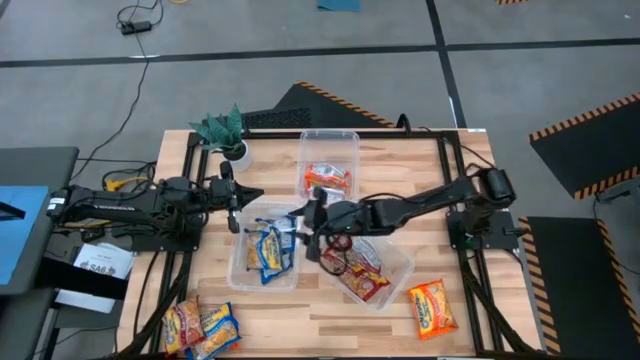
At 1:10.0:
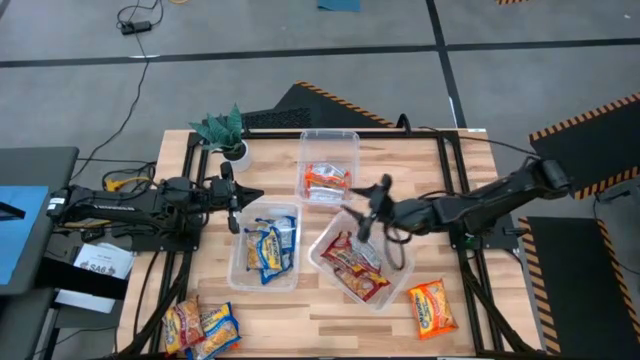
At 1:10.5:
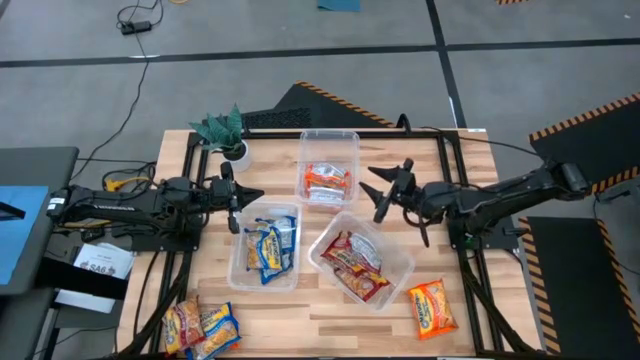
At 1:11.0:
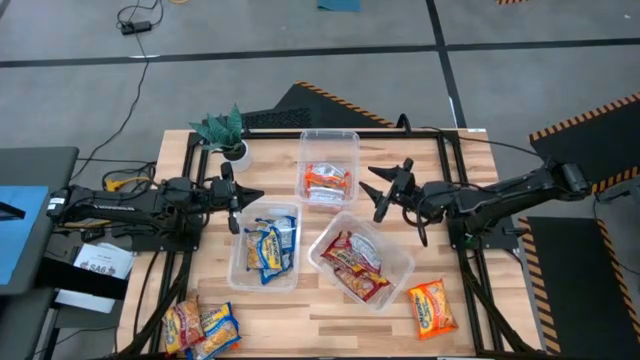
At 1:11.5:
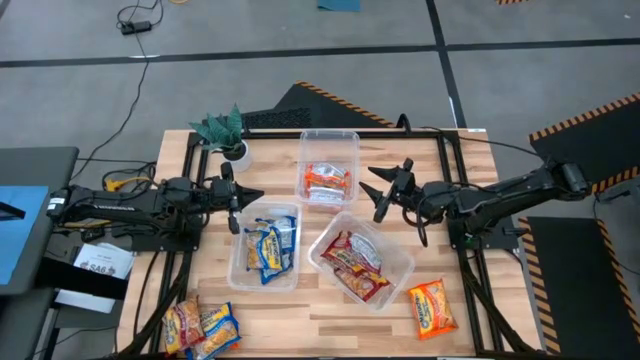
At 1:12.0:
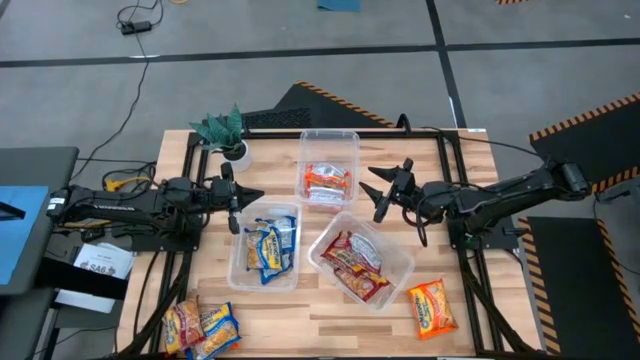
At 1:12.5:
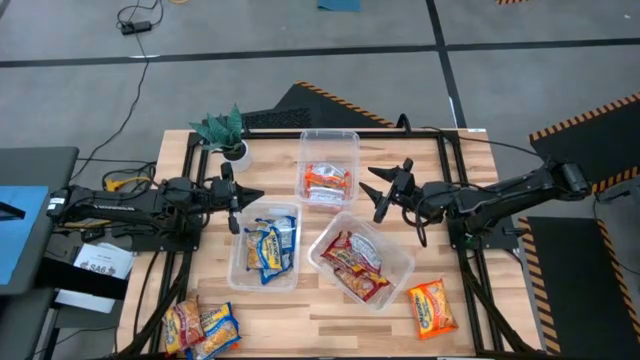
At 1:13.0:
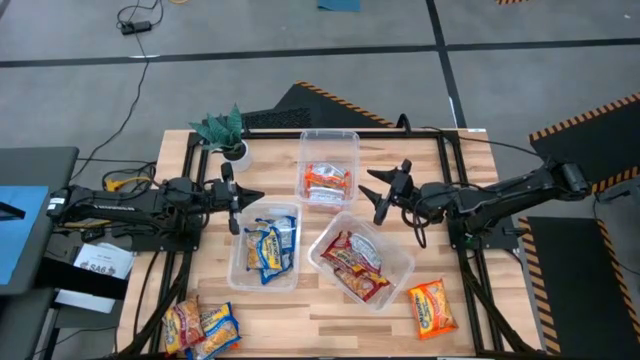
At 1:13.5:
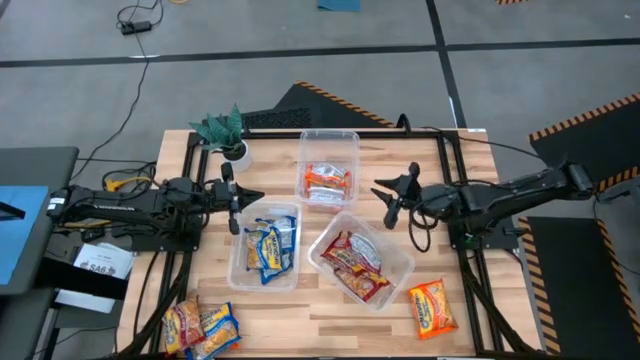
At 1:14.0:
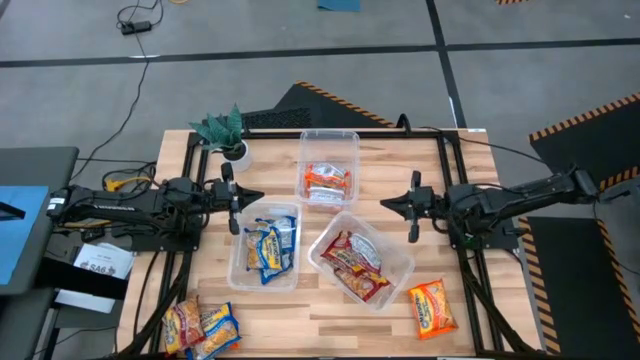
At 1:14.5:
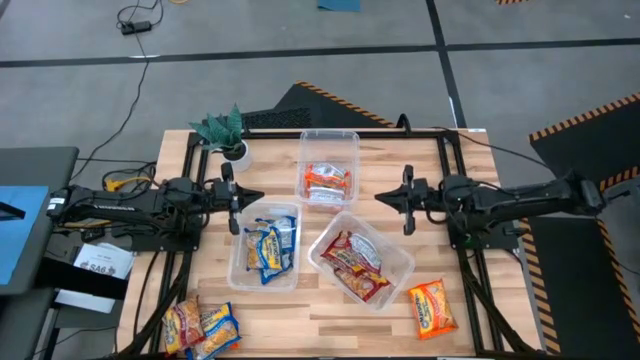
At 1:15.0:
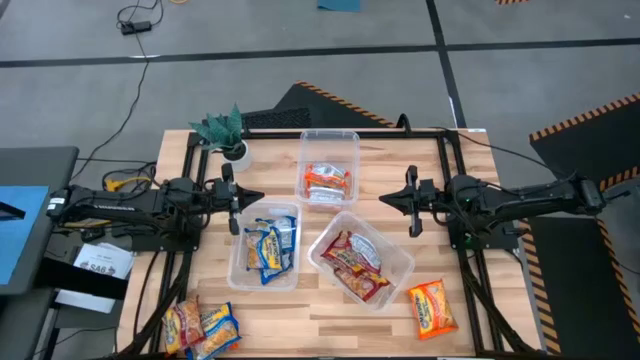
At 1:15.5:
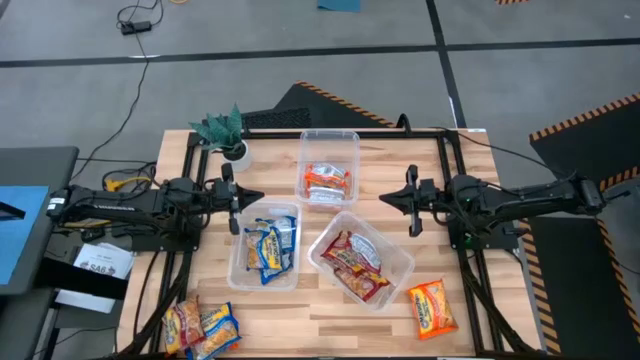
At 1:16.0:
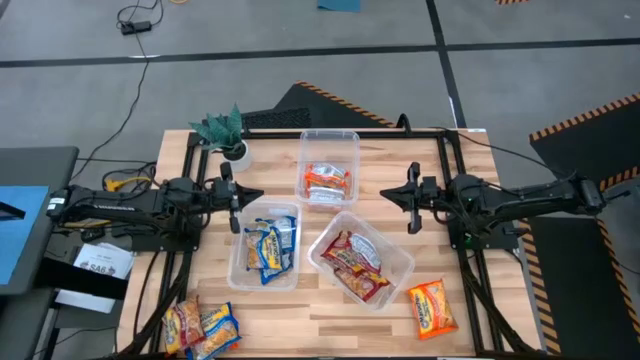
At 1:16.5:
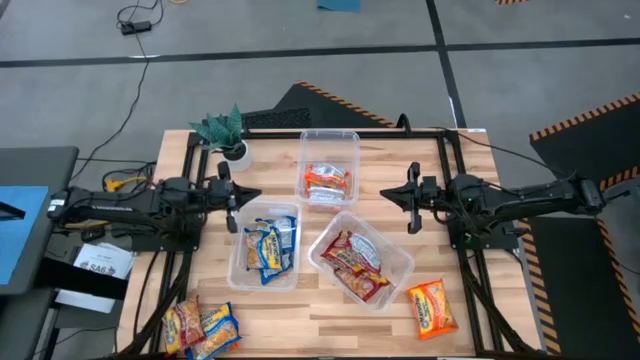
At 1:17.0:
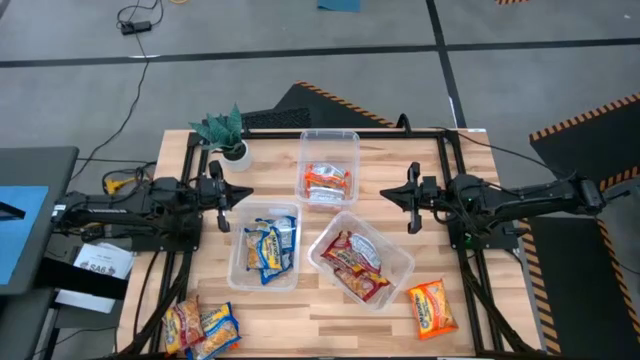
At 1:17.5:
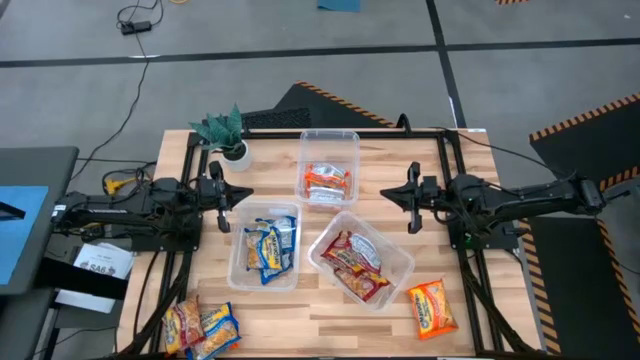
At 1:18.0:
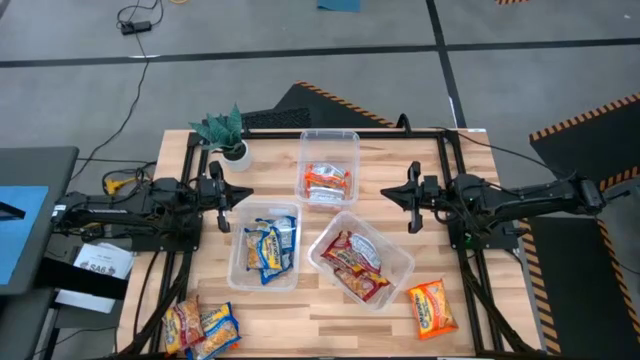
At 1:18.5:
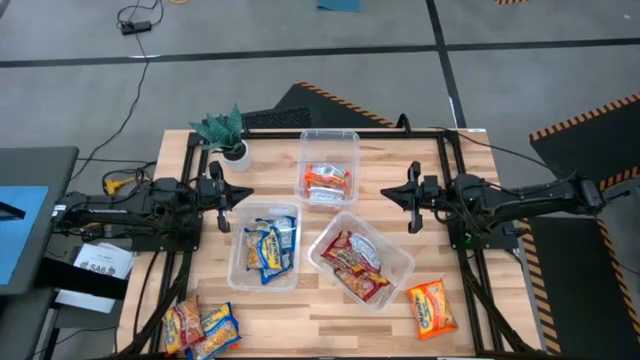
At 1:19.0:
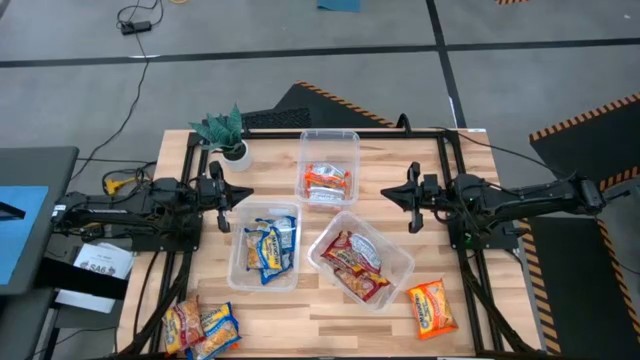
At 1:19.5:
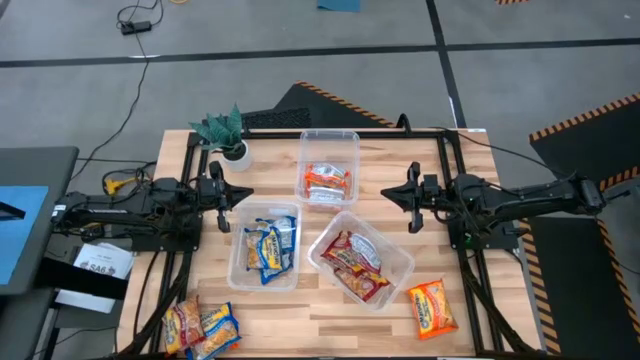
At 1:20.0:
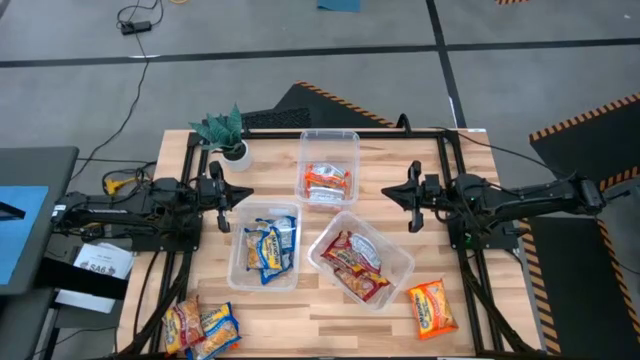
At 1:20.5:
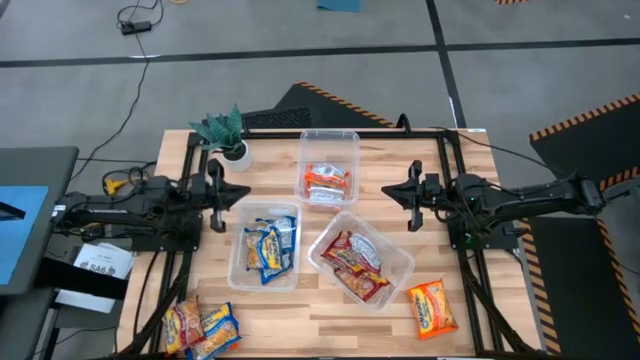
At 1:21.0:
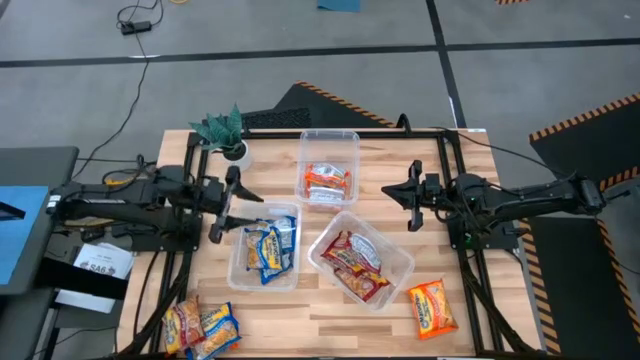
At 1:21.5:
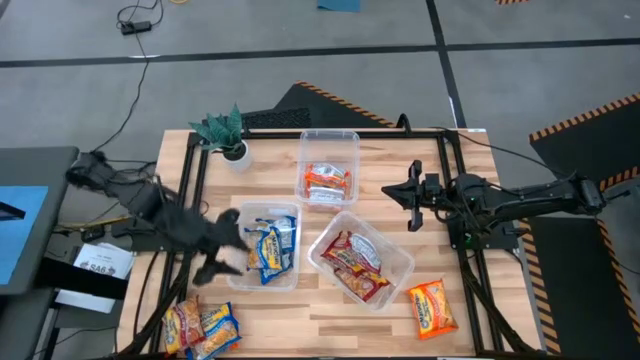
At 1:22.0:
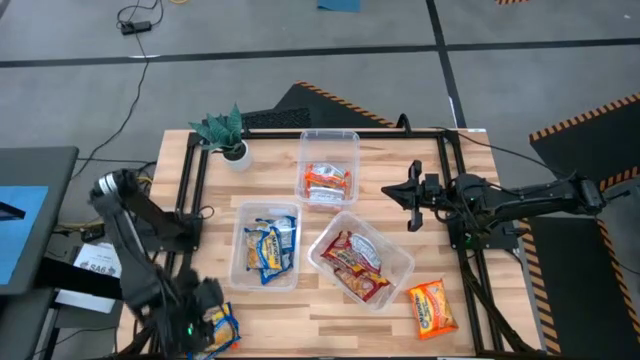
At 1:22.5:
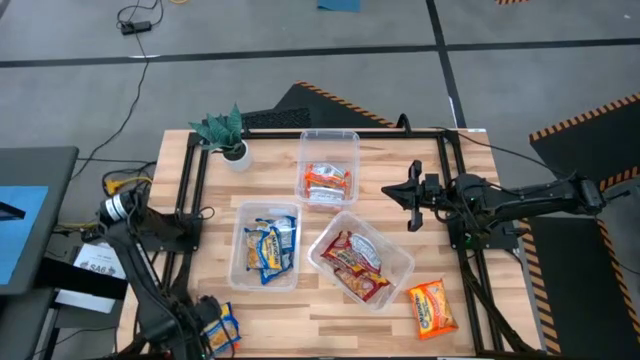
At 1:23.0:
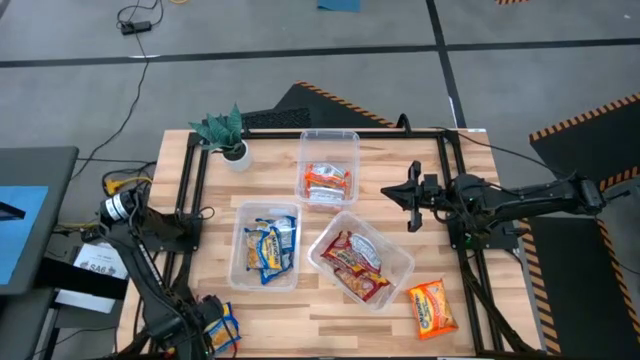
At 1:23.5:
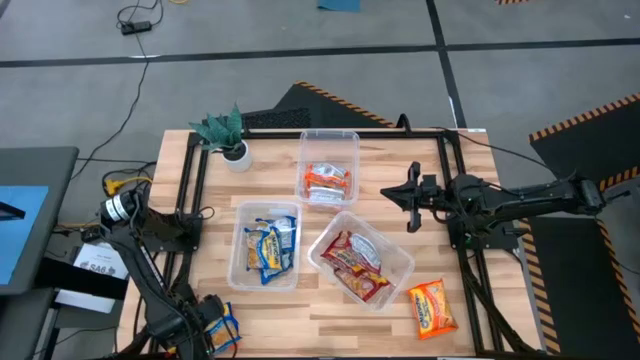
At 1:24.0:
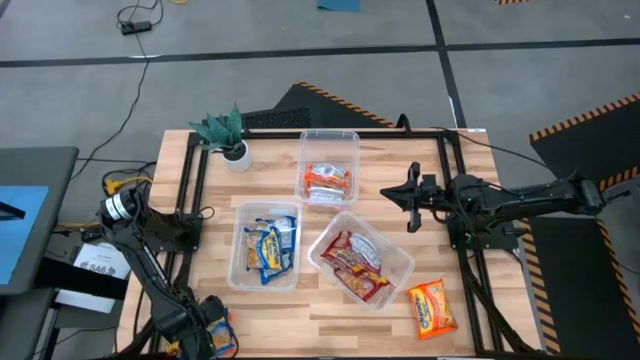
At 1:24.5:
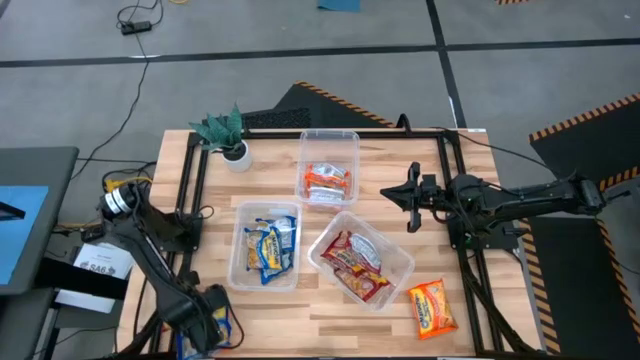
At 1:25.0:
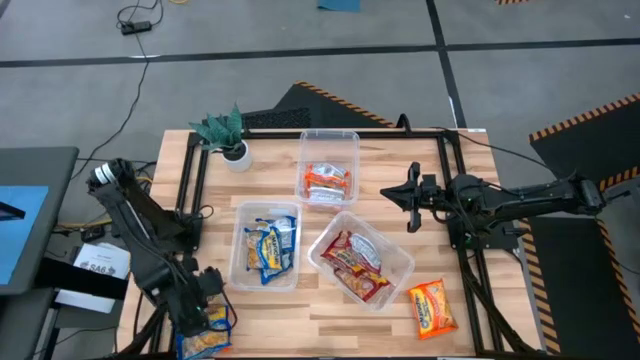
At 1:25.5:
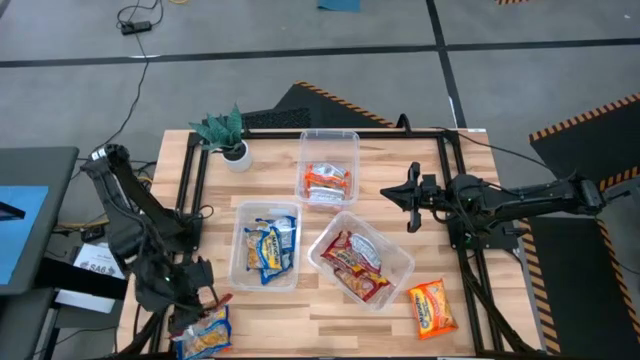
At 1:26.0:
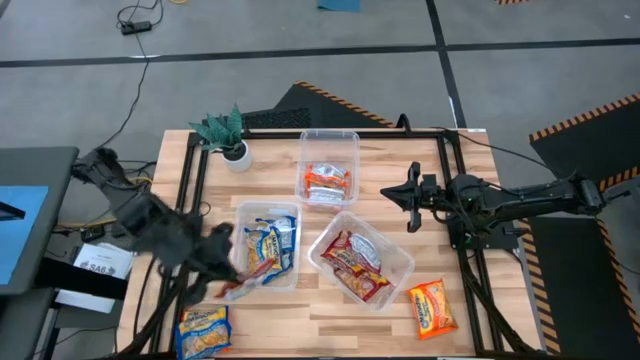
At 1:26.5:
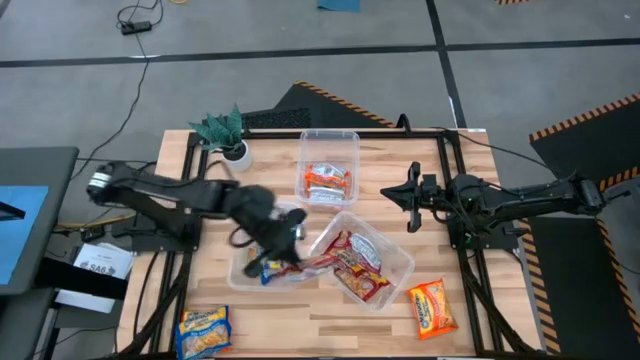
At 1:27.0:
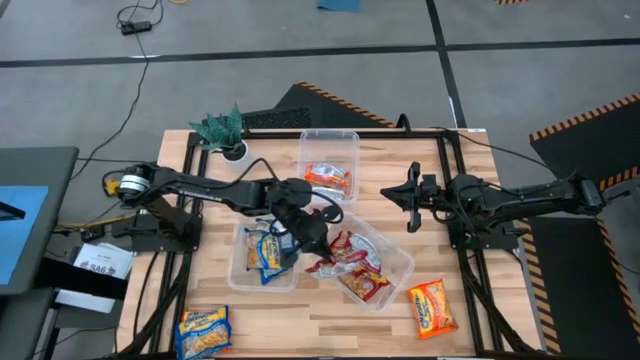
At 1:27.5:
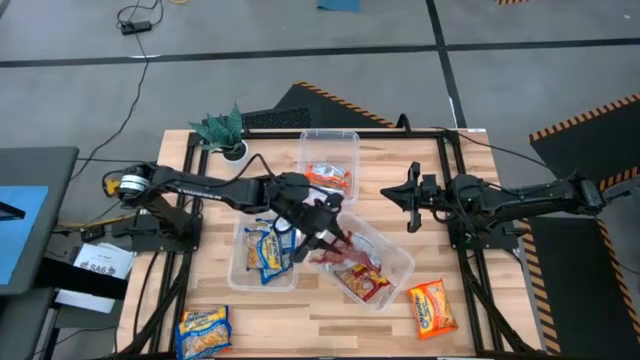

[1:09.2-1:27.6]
Task: Sort Maruchan noodles
Put the red noodle pack into the bottom right transparent bin

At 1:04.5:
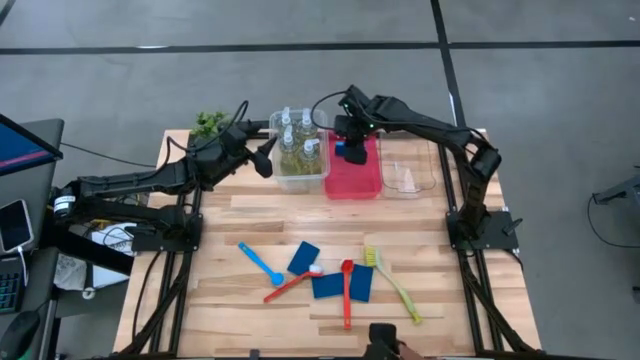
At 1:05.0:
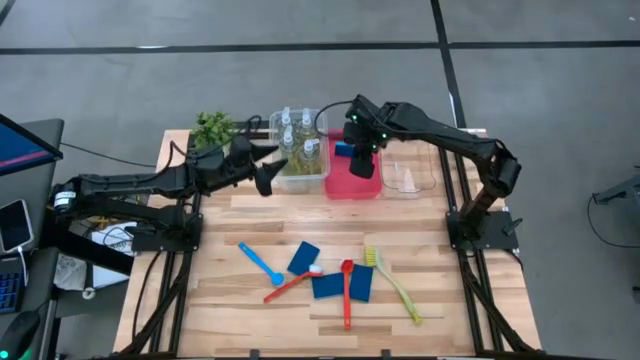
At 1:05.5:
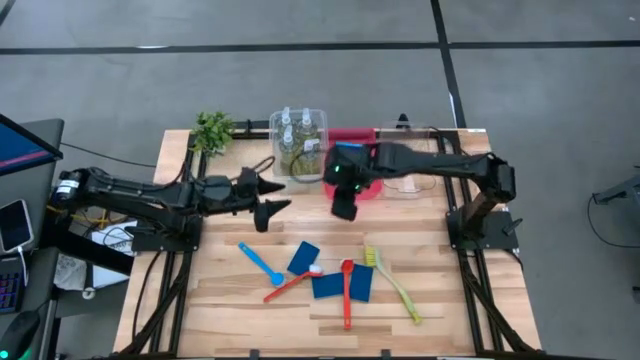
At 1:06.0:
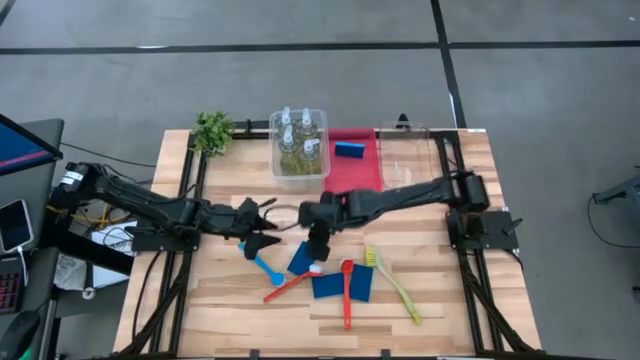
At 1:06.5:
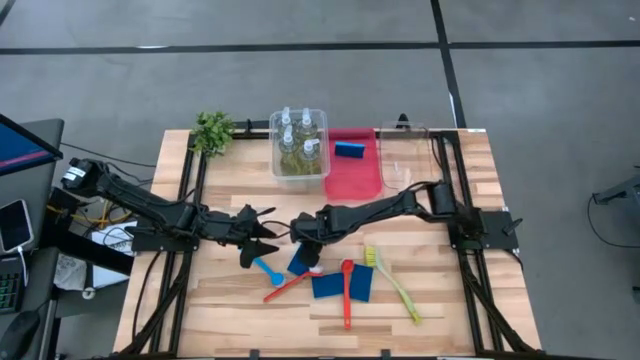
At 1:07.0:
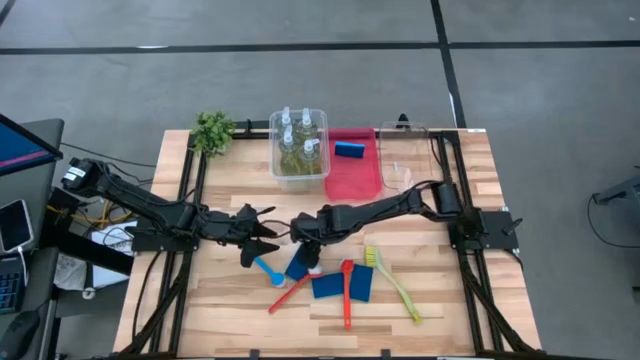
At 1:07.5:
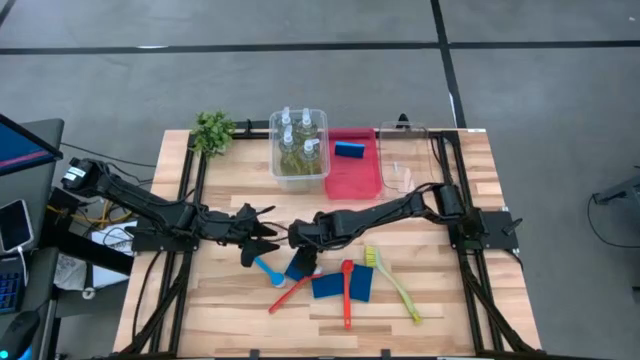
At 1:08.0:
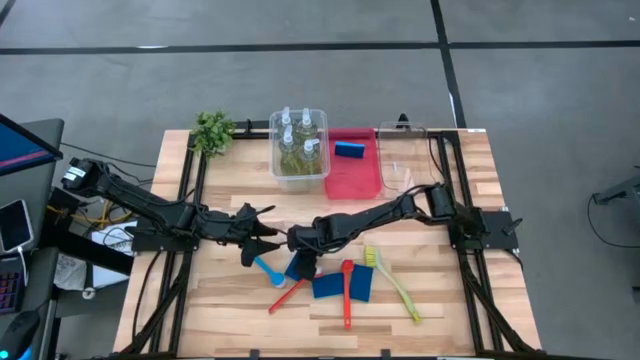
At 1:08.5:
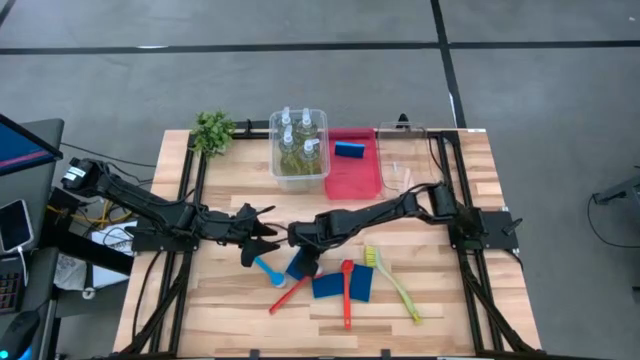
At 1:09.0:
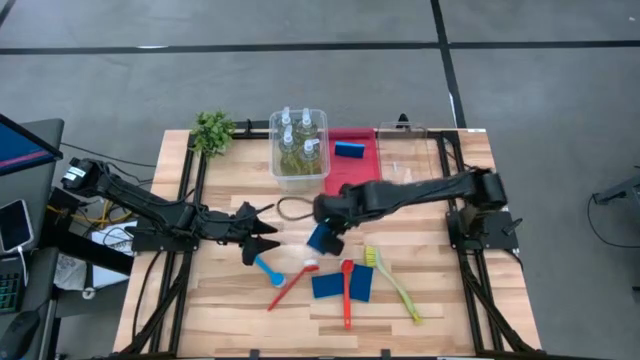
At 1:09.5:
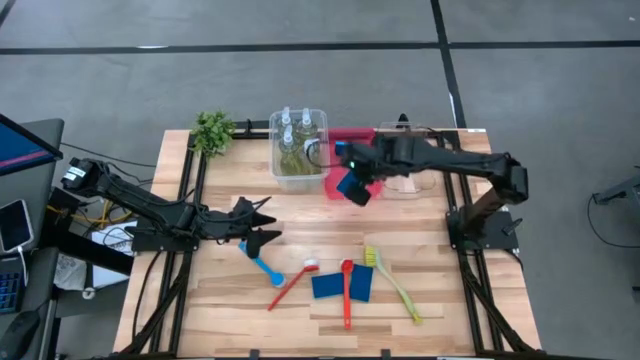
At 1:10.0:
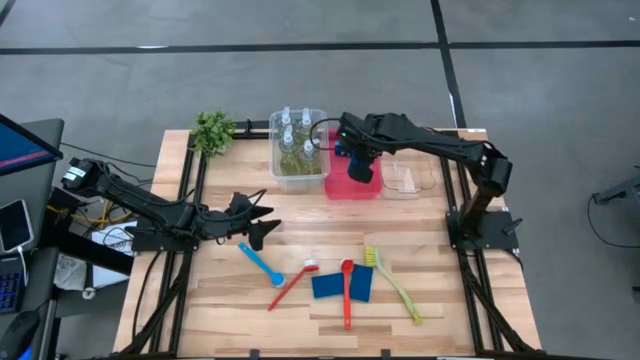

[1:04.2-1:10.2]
Task: Pick & Place Kitchen Sink Supplies
Put the blue sponge into the red bin
